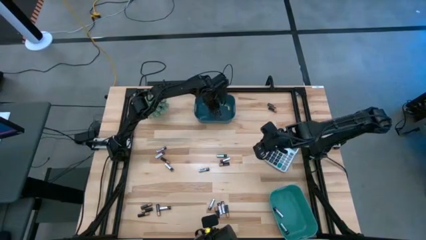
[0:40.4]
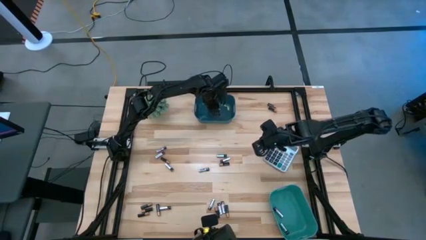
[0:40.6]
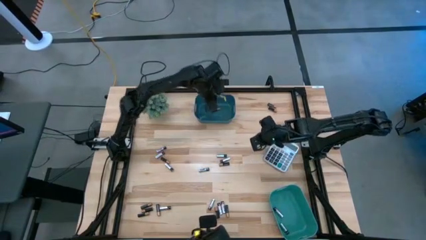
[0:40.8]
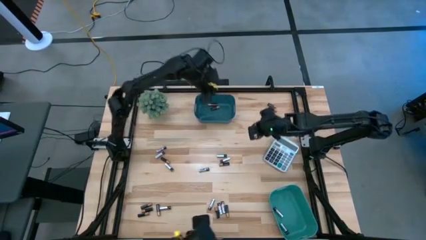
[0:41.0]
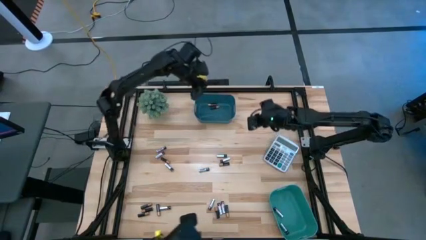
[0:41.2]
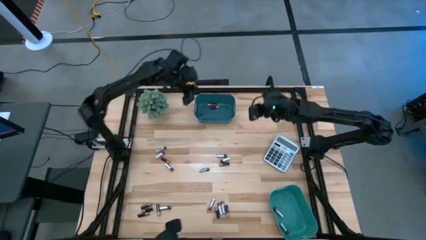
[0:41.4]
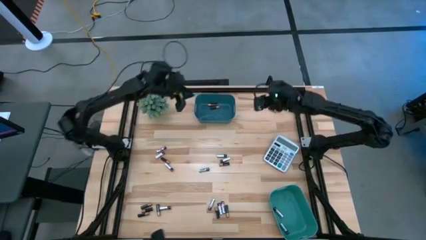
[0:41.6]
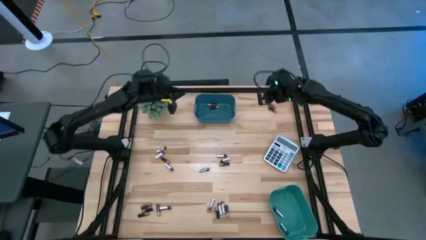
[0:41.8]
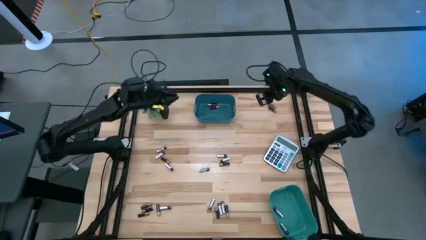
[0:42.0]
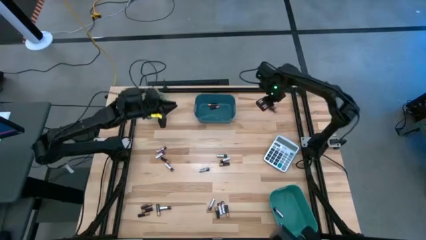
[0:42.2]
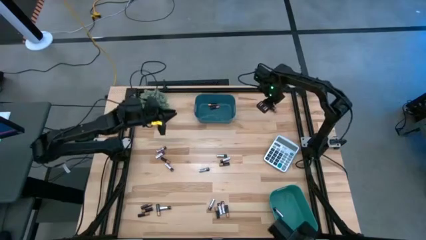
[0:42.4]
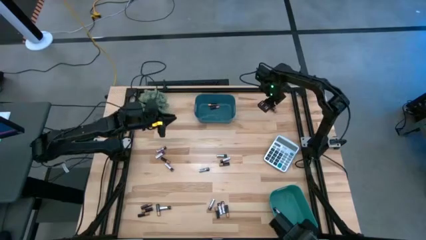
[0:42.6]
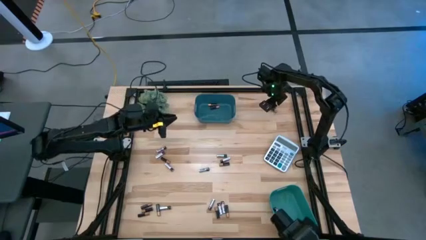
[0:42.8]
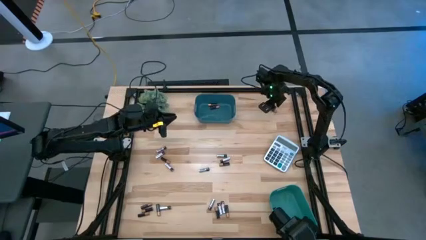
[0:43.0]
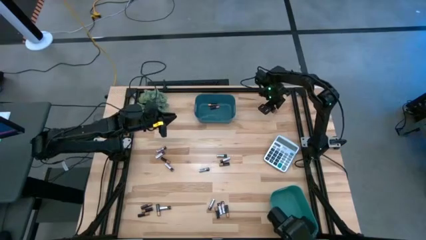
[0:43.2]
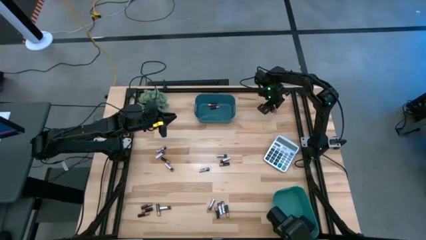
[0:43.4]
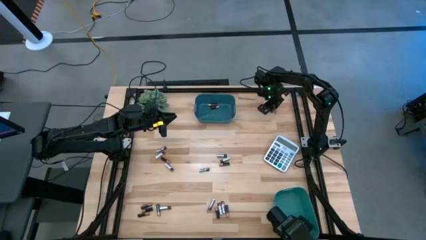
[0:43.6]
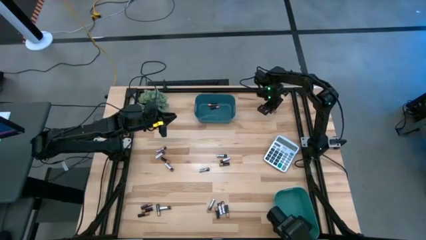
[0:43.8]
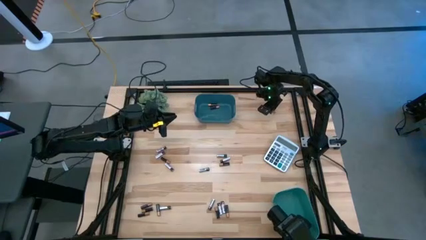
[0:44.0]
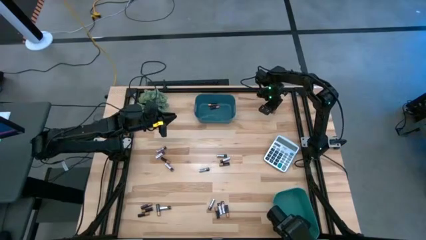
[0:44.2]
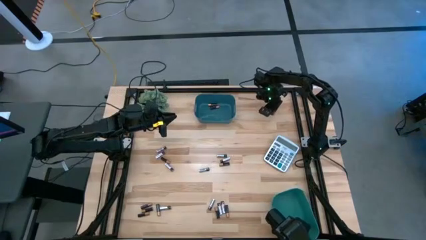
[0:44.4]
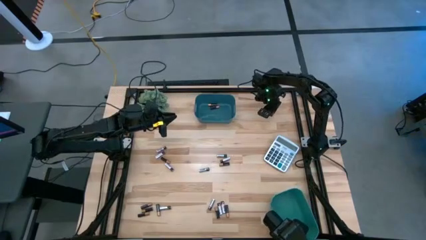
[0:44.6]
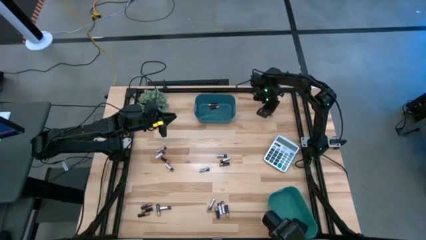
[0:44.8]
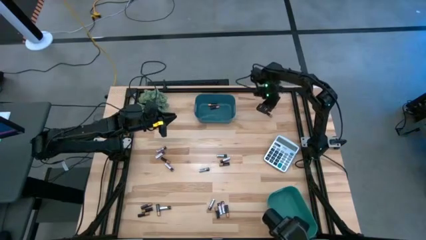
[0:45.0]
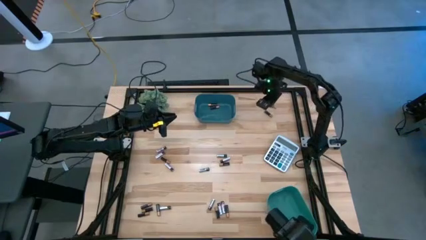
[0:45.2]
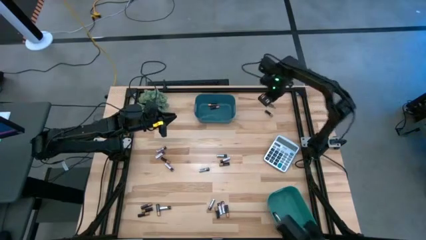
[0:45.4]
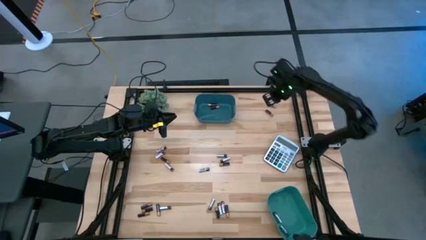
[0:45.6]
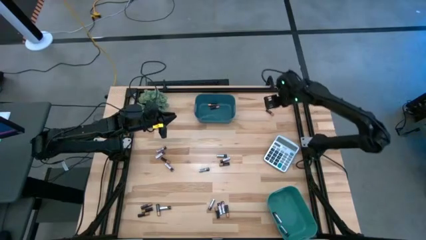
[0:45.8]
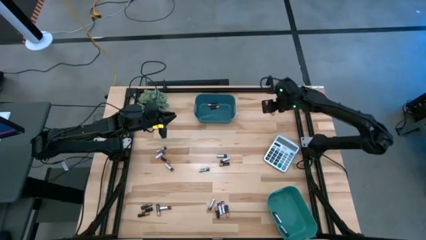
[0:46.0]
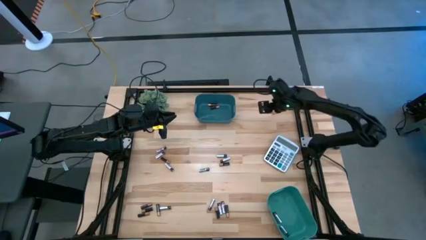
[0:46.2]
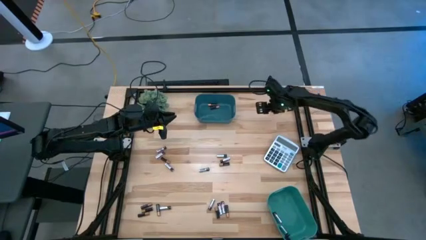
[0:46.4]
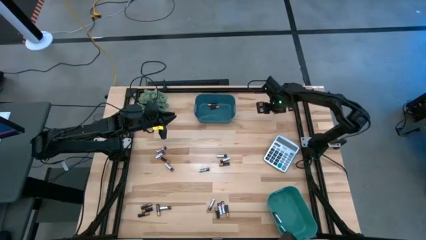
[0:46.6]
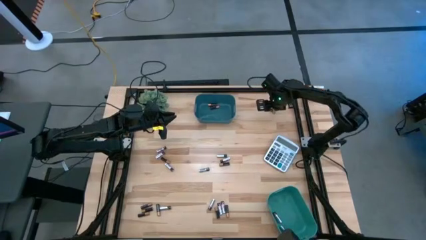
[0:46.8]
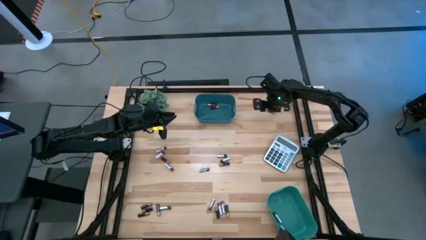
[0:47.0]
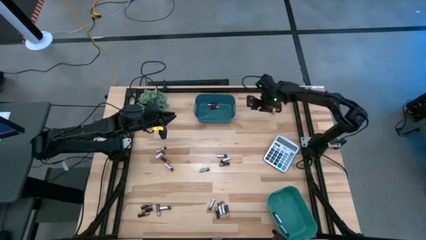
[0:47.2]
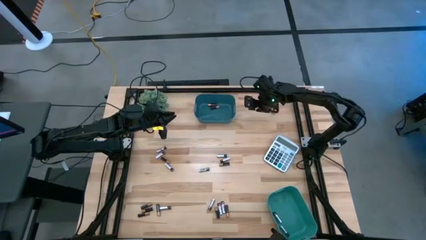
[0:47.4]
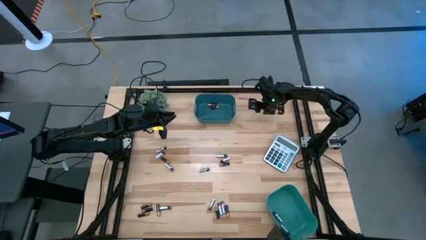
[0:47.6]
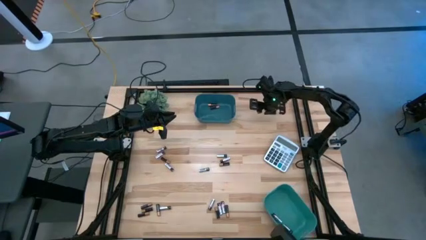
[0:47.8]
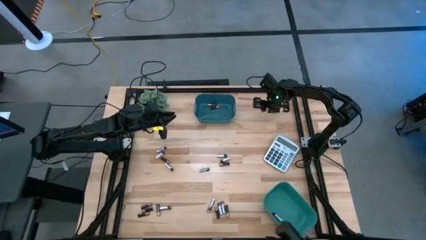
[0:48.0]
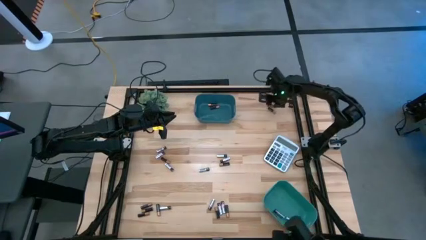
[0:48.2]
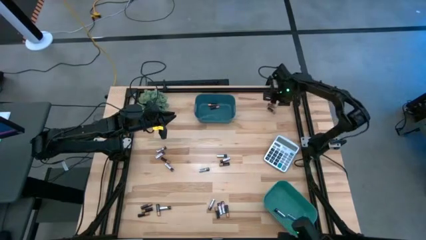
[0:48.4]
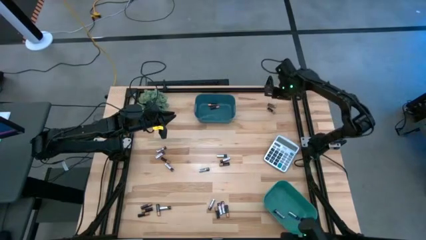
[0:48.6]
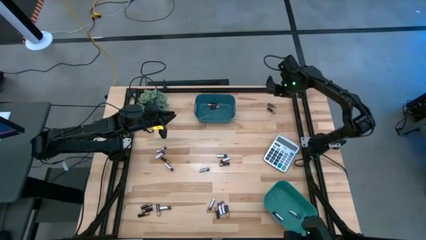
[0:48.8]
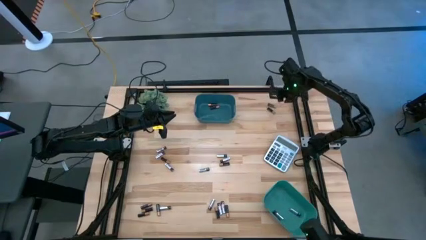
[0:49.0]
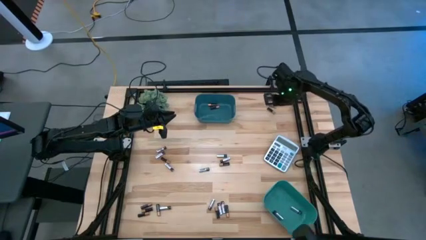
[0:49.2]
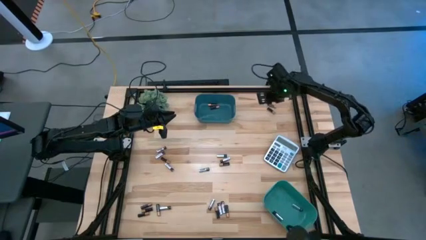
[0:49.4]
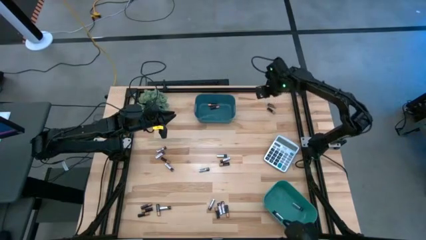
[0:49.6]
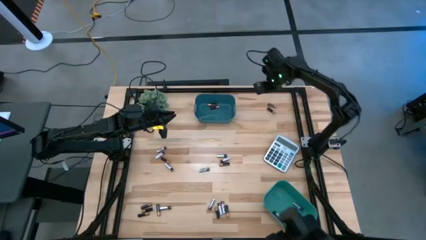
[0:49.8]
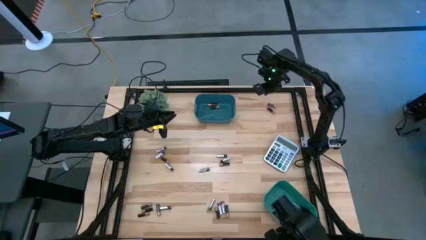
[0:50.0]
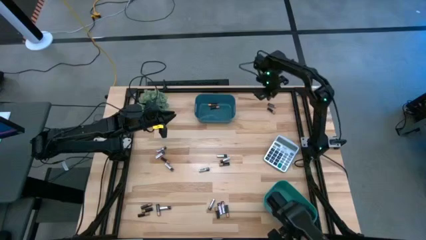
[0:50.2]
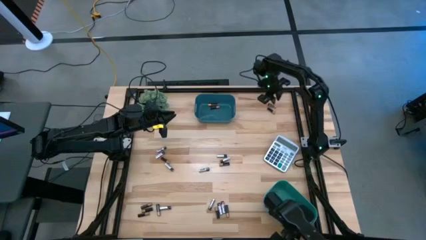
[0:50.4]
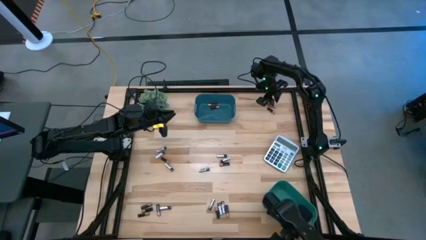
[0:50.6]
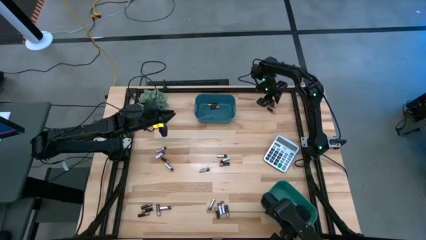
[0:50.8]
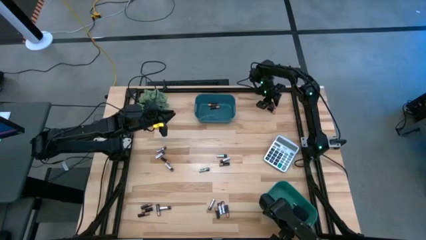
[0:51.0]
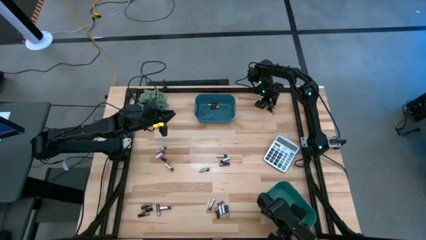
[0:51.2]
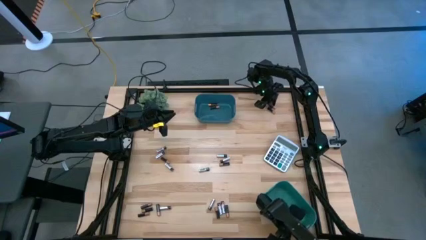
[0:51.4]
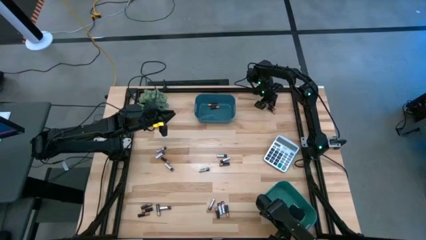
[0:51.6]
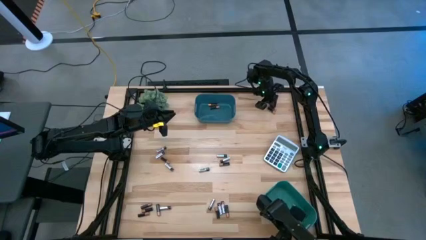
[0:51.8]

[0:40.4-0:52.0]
Task: Sort batteries
Put the black battery into the blue bin

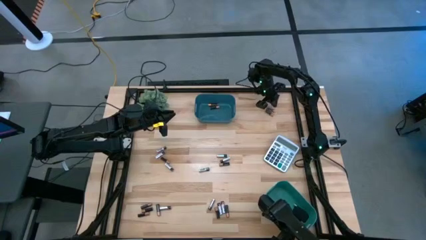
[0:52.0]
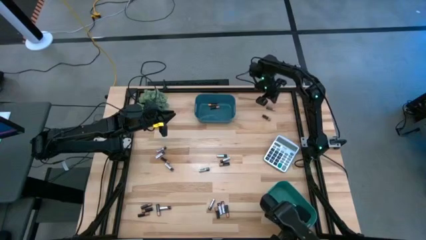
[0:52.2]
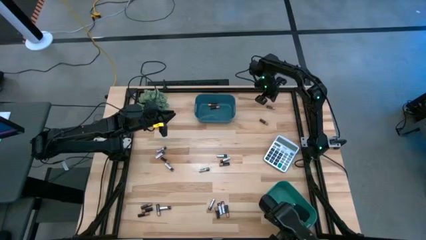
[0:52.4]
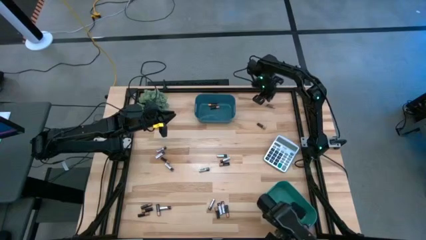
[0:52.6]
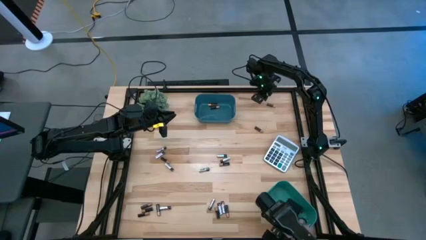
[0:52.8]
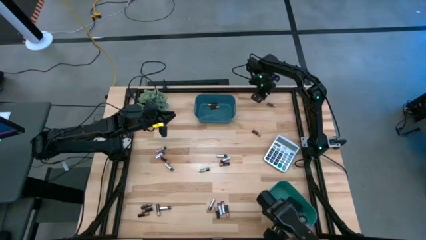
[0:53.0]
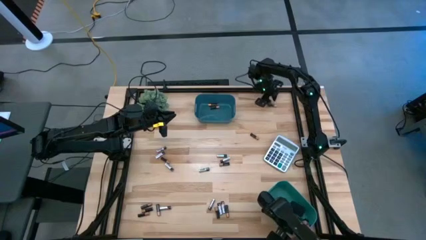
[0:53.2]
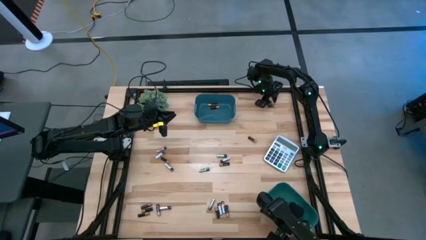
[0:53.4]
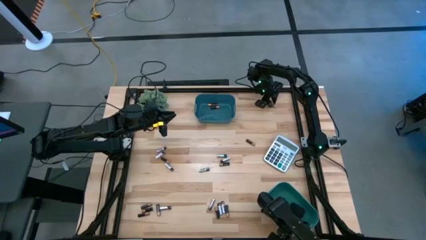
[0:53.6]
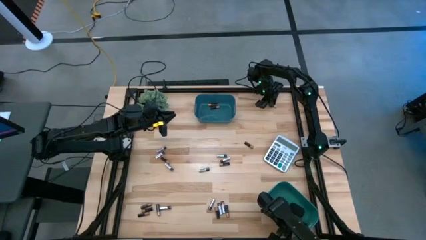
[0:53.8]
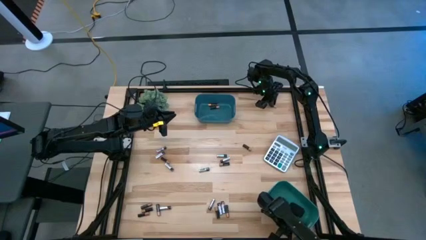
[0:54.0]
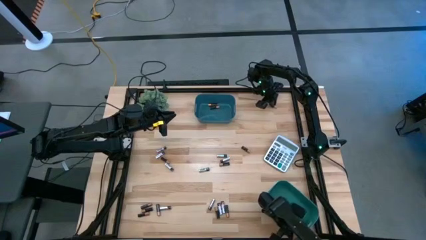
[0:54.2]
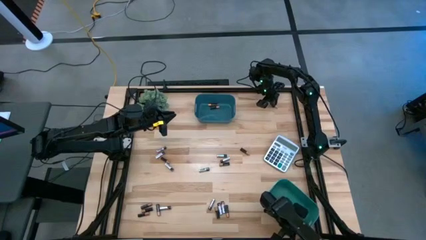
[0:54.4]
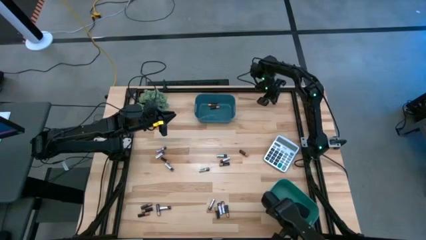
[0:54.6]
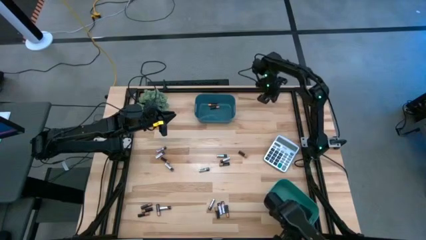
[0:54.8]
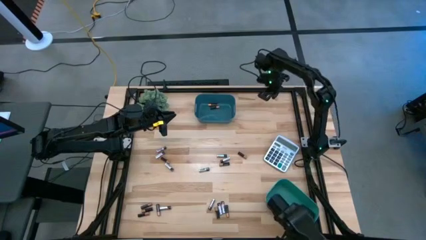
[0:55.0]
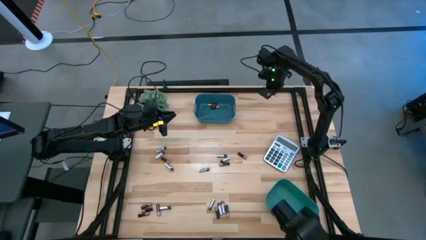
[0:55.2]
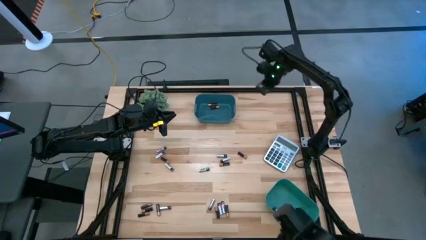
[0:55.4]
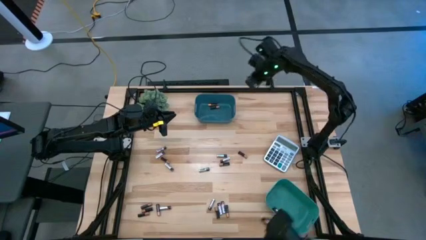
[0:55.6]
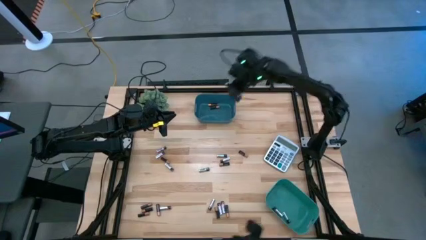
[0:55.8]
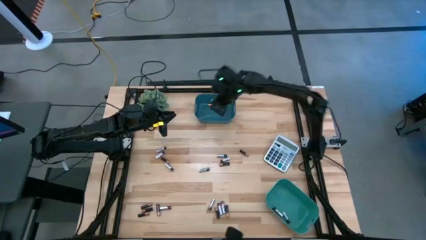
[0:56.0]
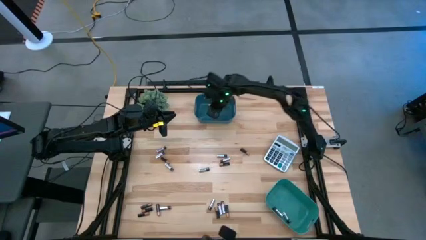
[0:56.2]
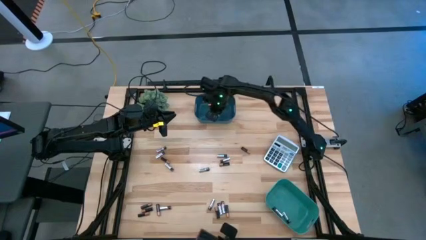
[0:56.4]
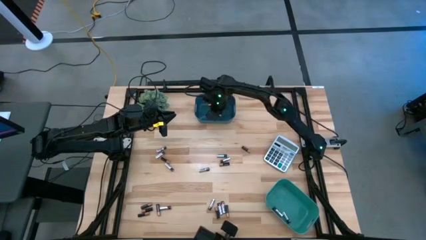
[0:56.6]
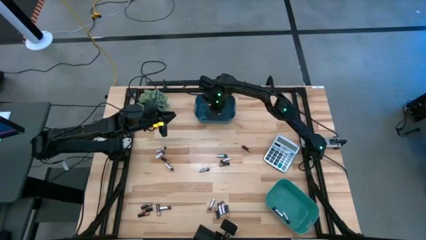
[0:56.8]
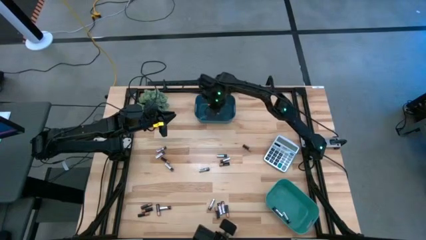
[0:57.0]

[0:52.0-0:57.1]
Put the black battery into the blue bin
